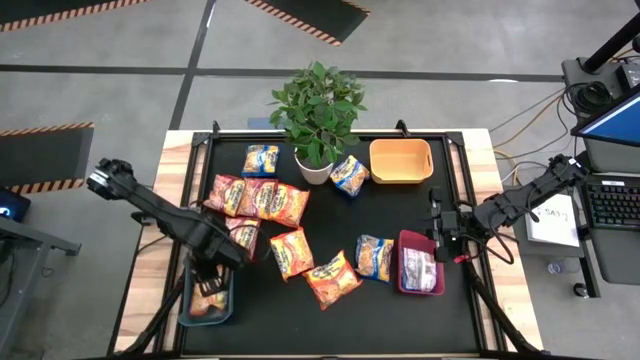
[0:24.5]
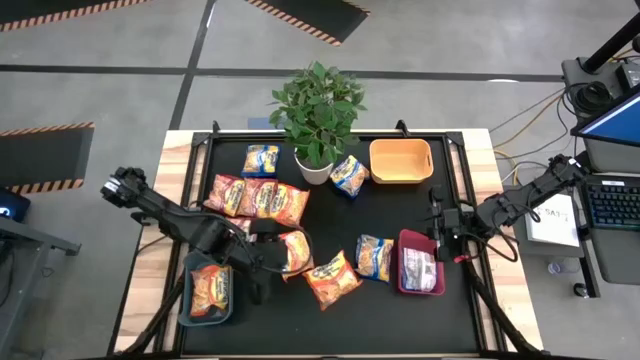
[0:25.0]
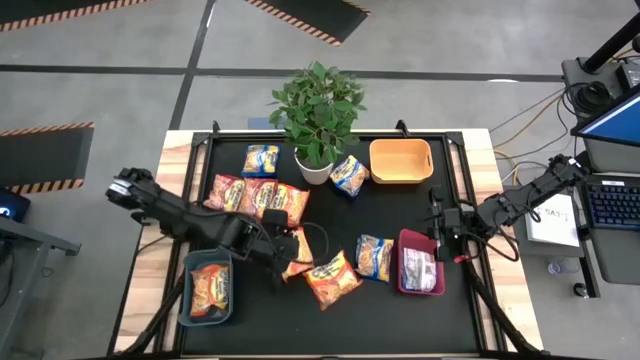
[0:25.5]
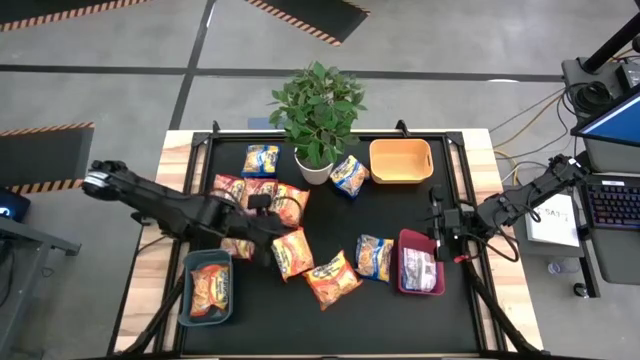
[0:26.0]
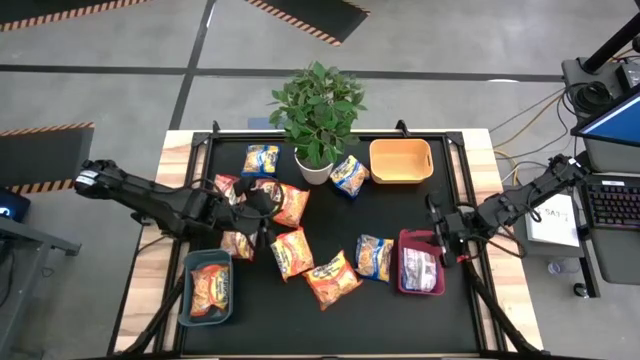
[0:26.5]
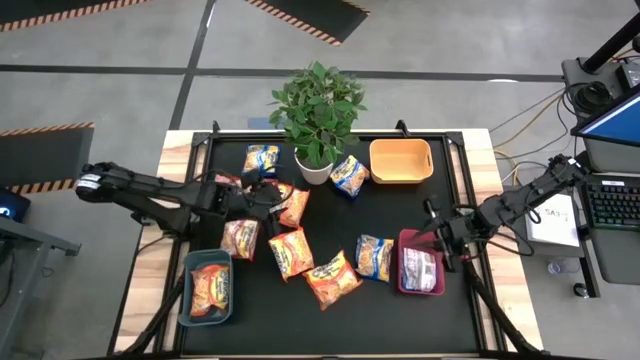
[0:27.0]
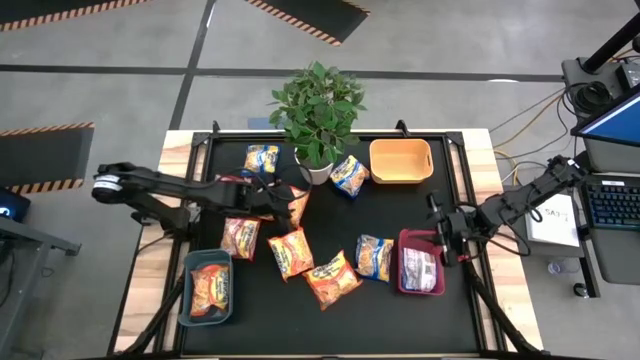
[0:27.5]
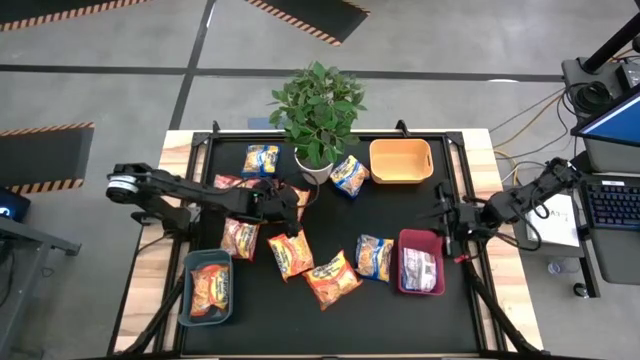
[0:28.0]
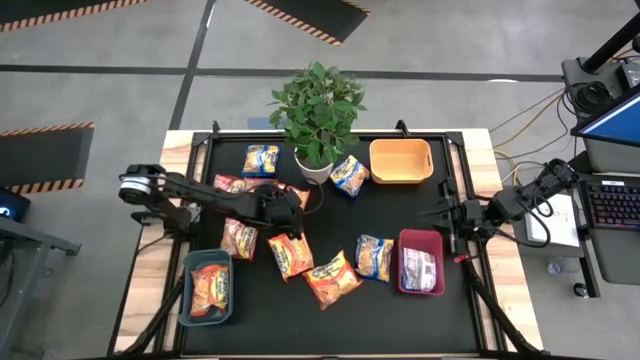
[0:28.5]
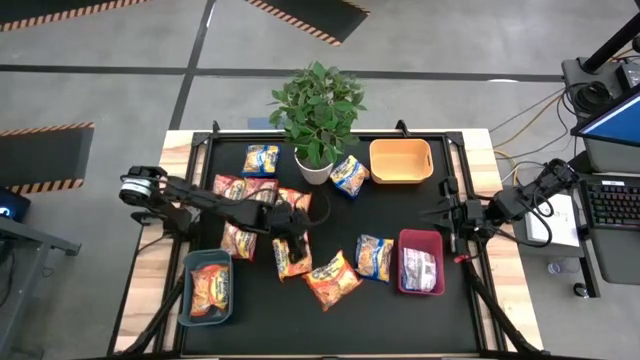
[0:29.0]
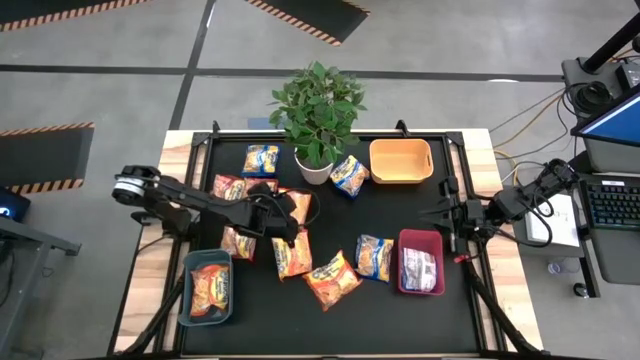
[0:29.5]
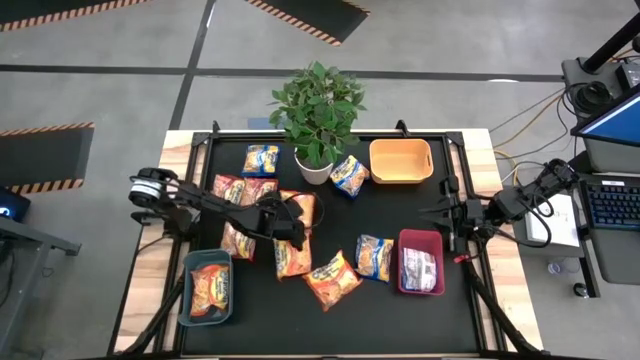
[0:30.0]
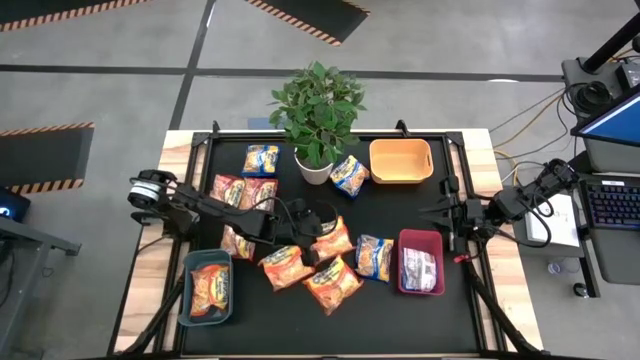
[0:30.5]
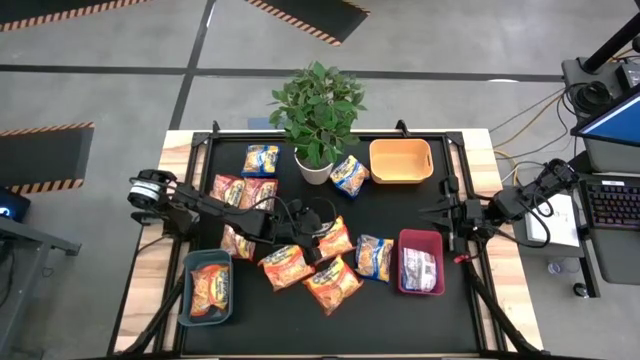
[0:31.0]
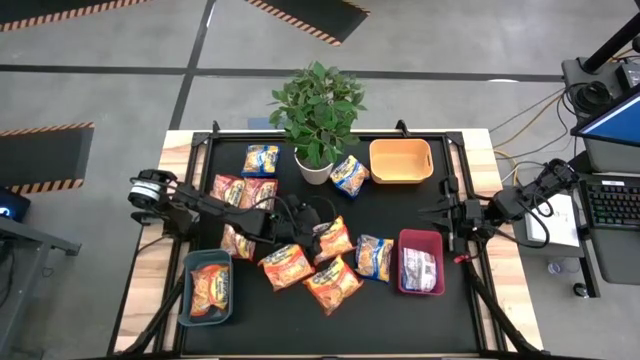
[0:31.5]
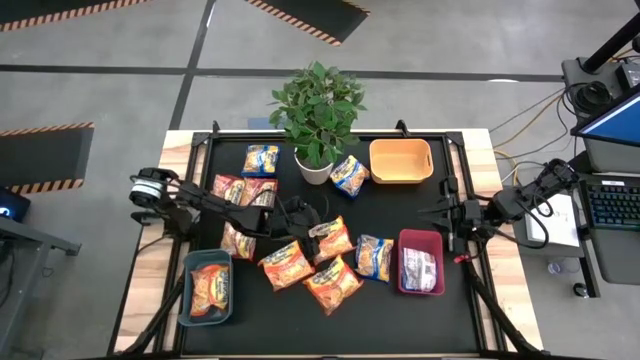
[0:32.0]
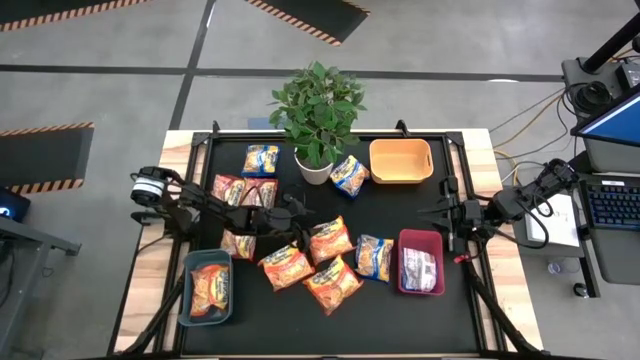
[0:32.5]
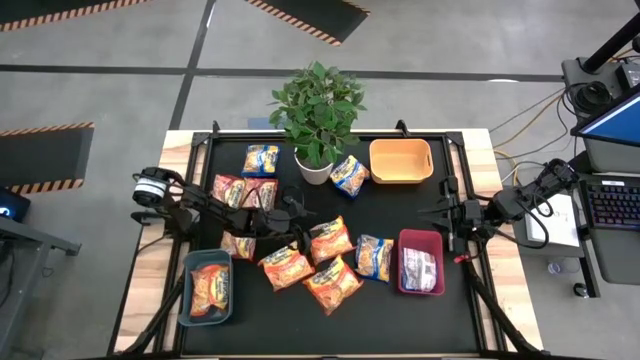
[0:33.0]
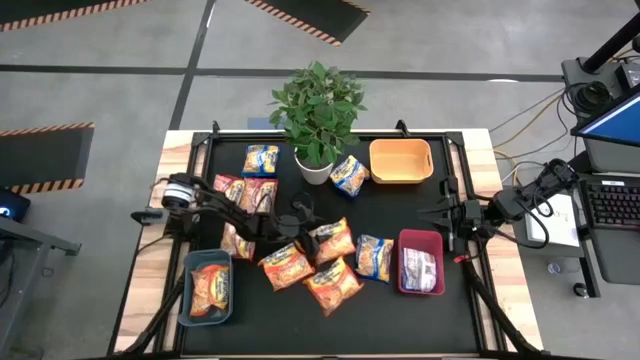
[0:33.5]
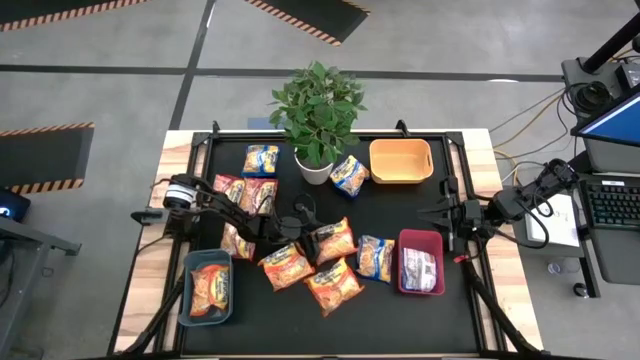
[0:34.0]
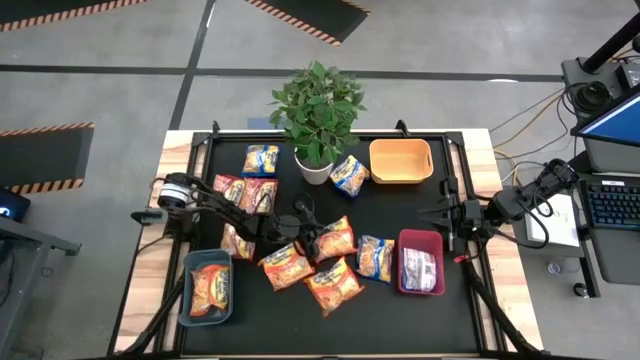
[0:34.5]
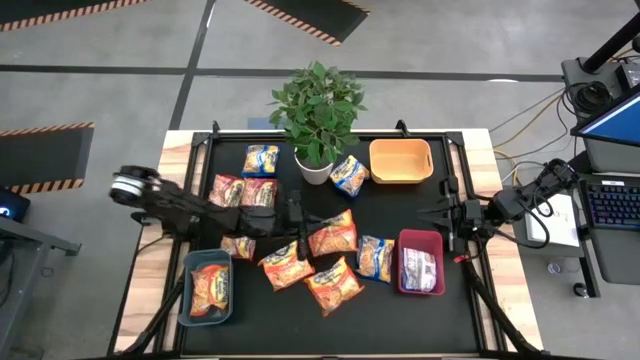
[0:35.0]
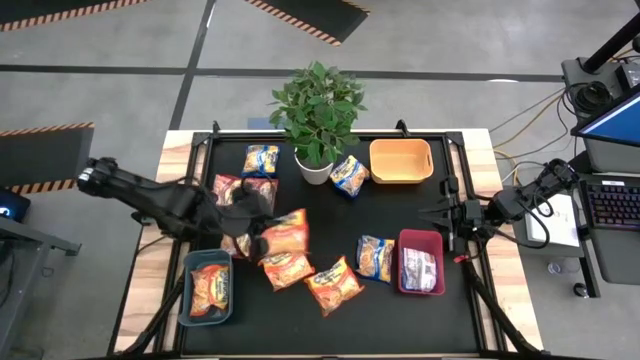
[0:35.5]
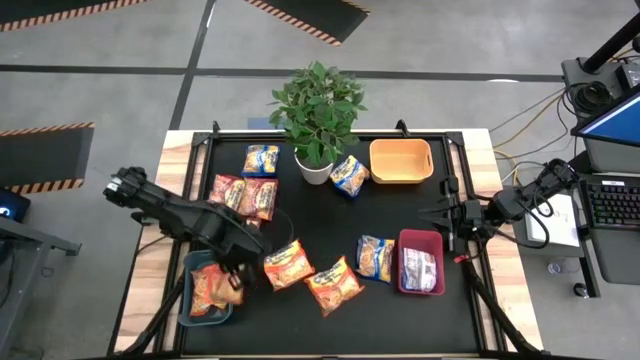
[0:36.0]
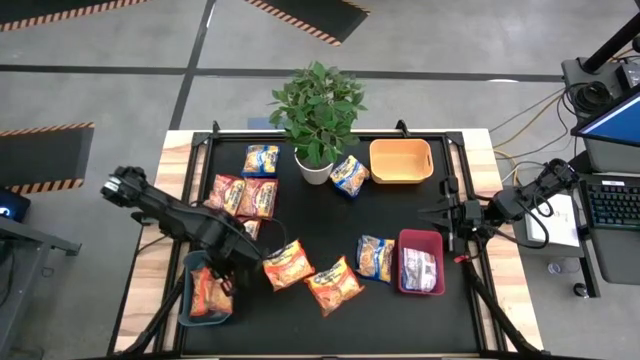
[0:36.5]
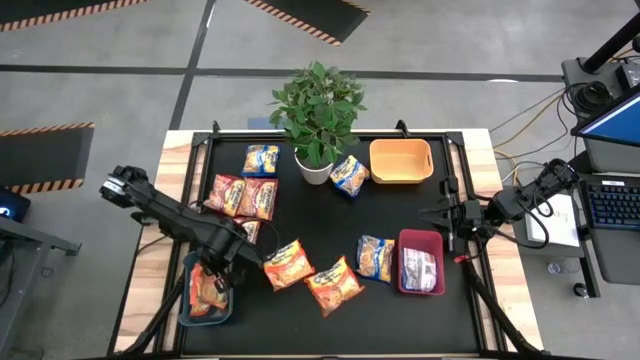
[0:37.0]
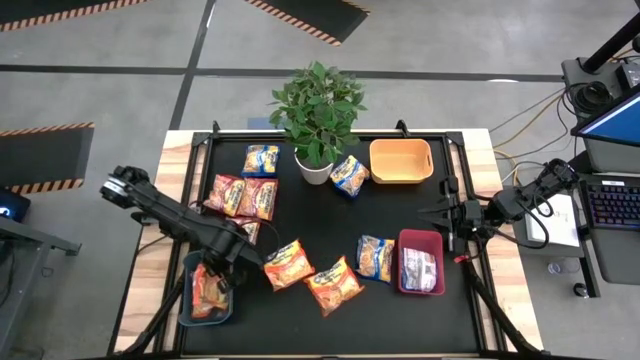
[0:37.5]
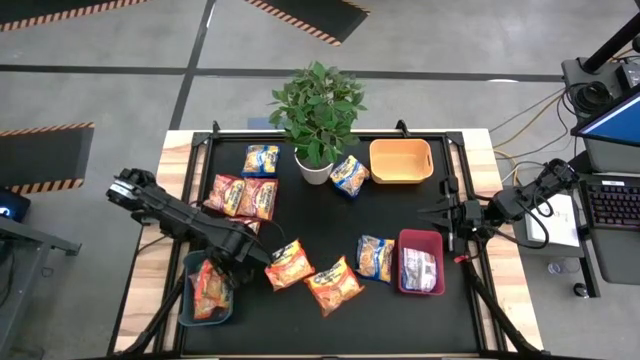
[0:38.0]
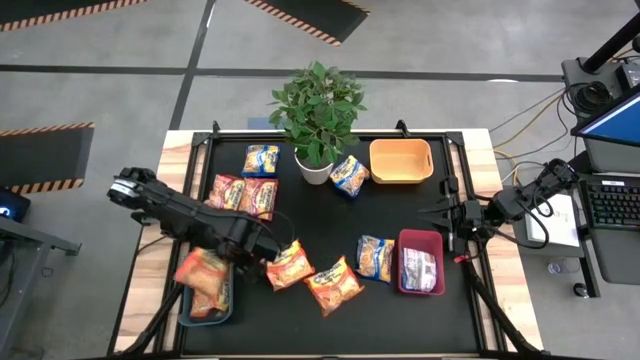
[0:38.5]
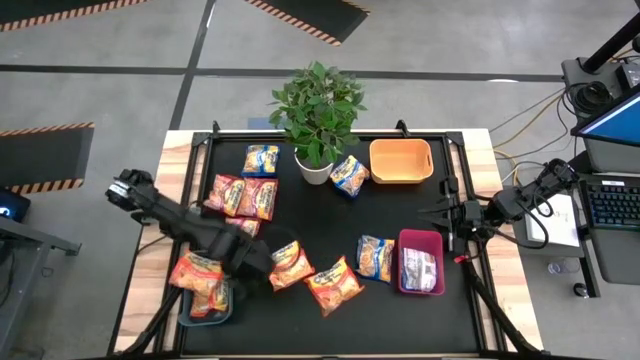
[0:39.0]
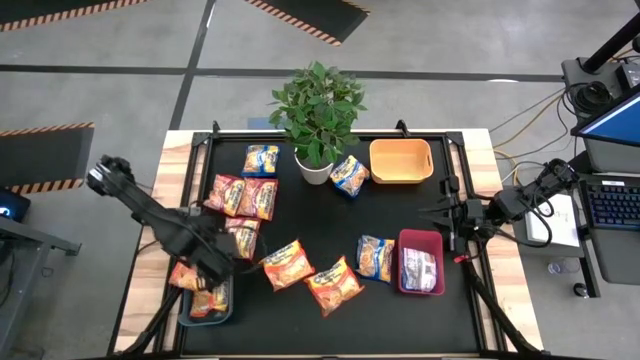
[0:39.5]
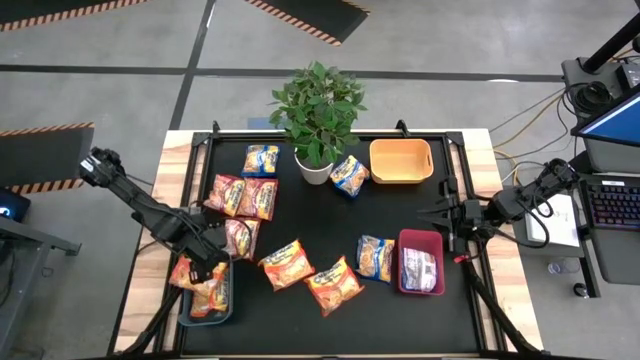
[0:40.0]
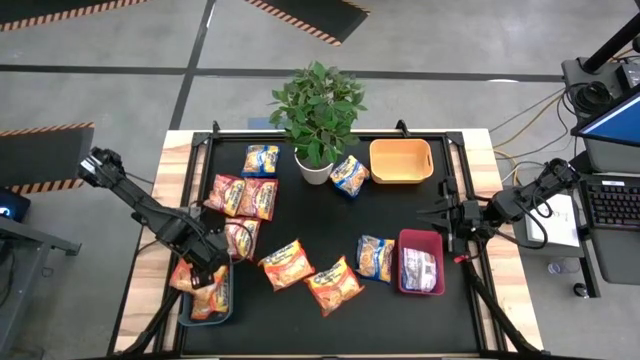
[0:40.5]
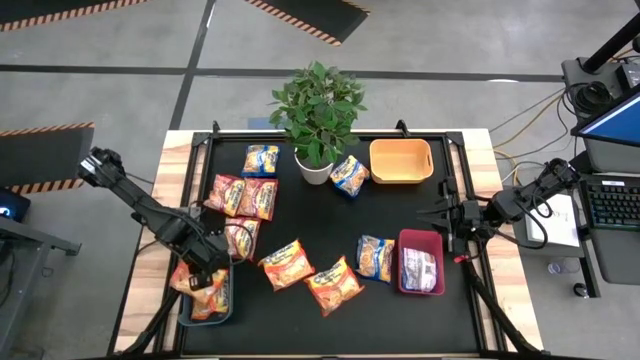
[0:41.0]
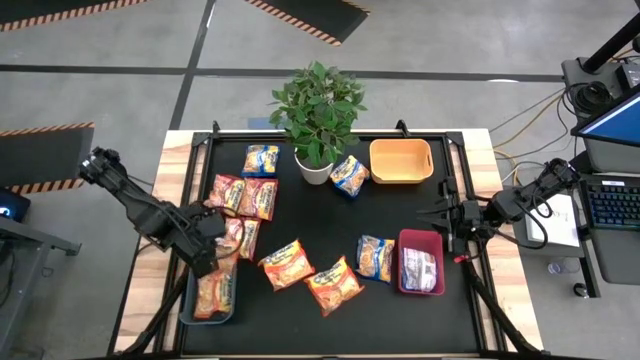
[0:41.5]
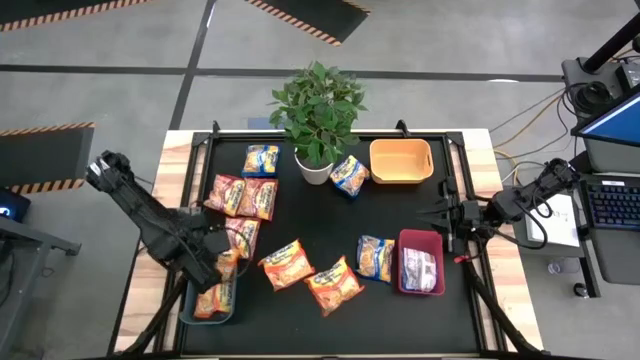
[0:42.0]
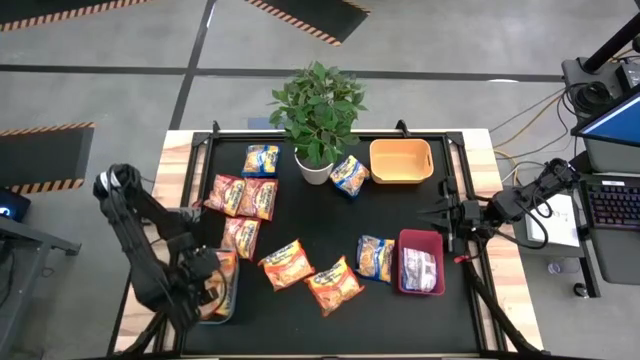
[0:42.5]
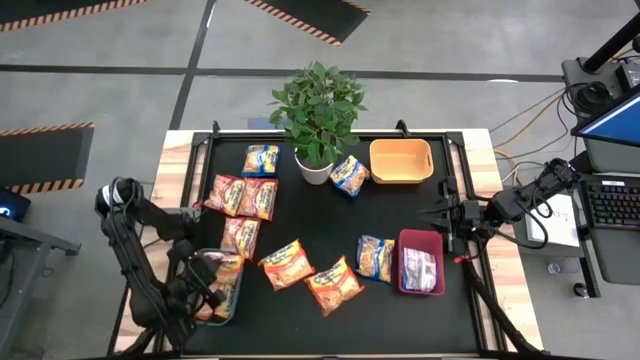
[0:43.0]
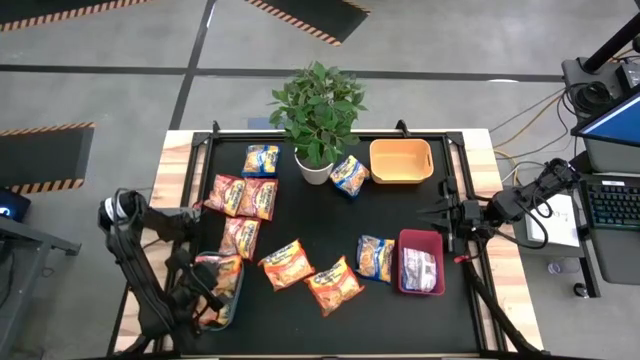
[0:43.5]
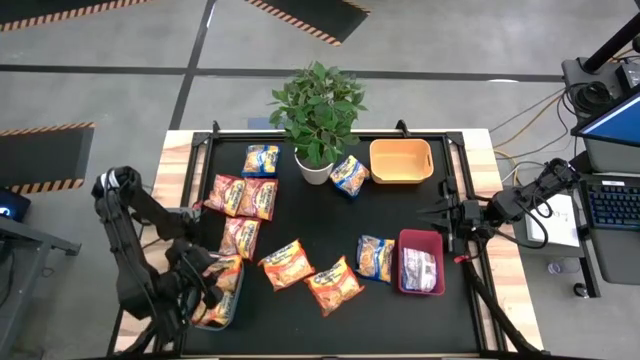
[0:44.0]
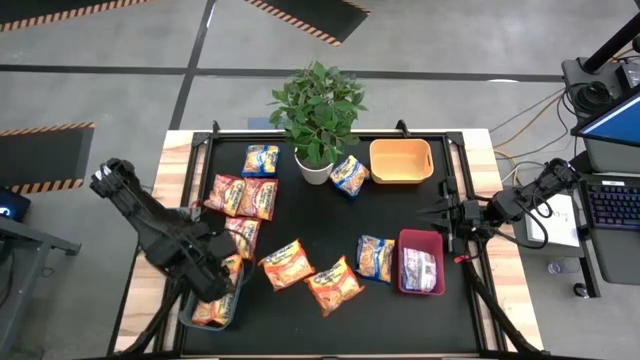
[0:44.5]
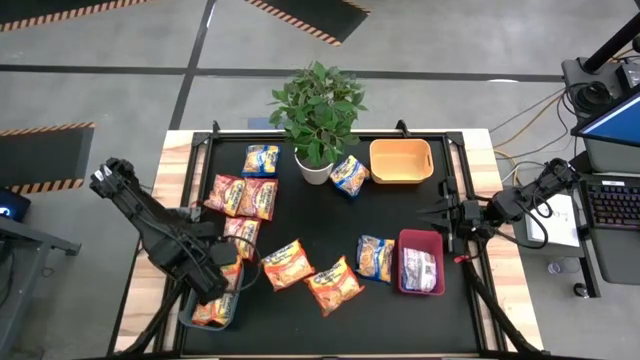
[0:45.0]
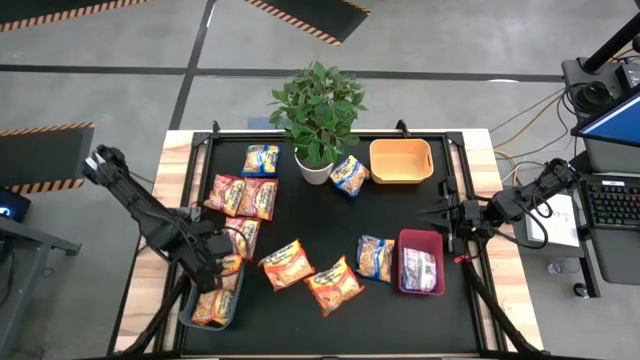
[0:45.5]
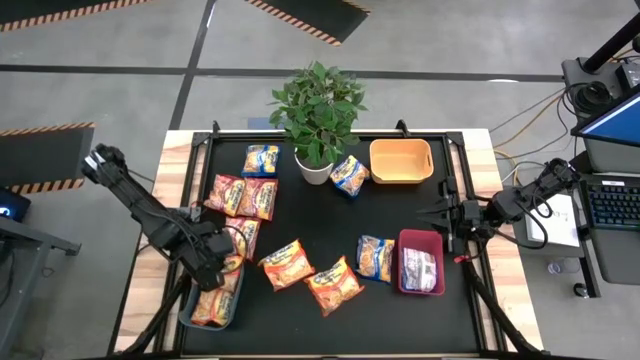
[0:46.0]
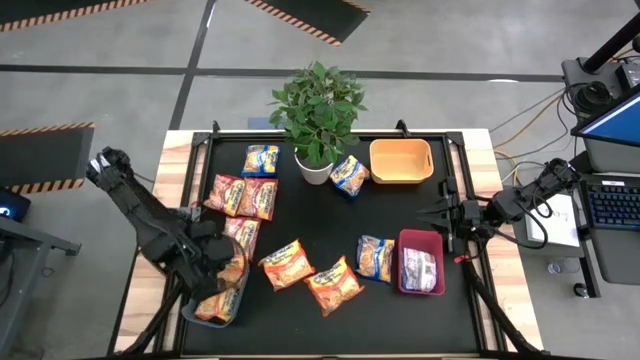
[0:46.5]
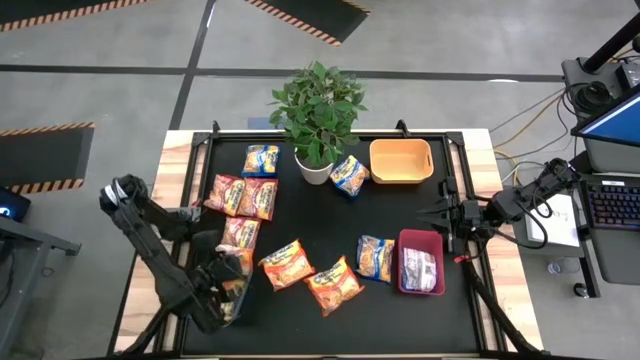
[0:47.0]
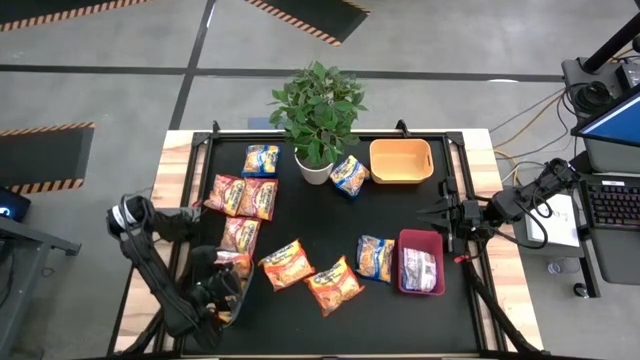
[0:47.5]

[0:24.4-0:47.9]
Task: Sort Maruchan noodles
Put the orange noodle pack into the blue bin
